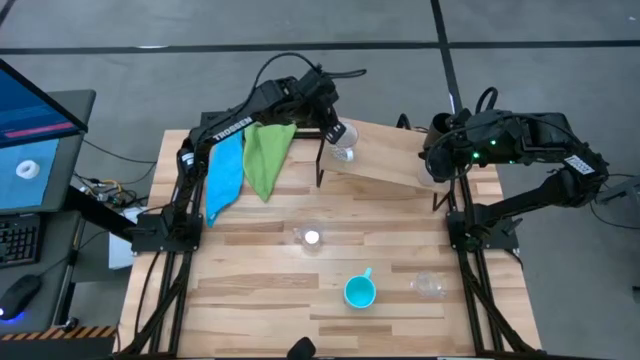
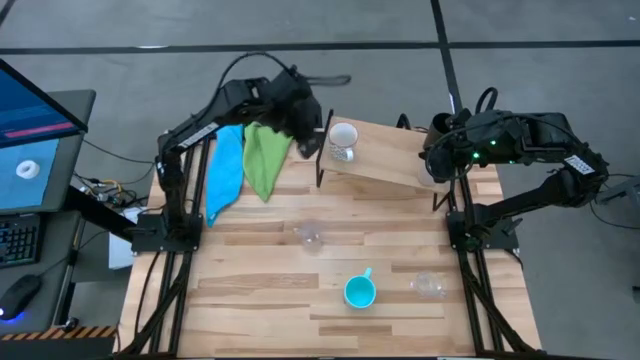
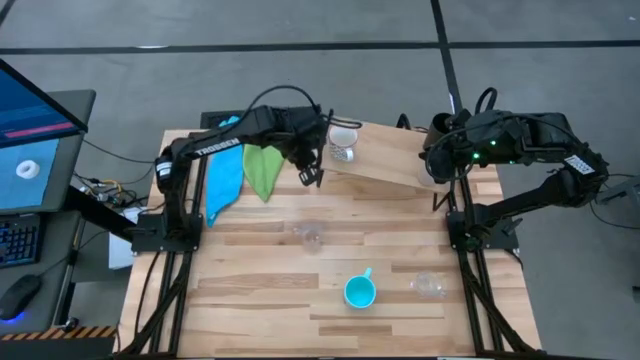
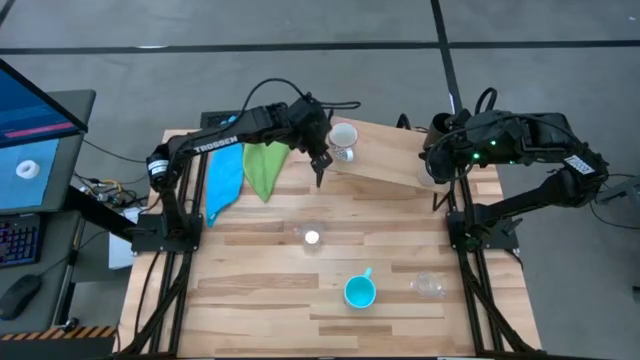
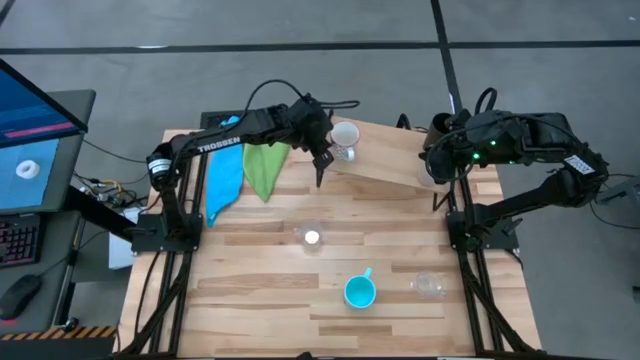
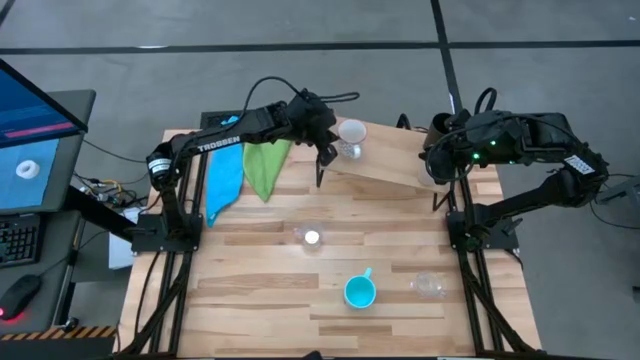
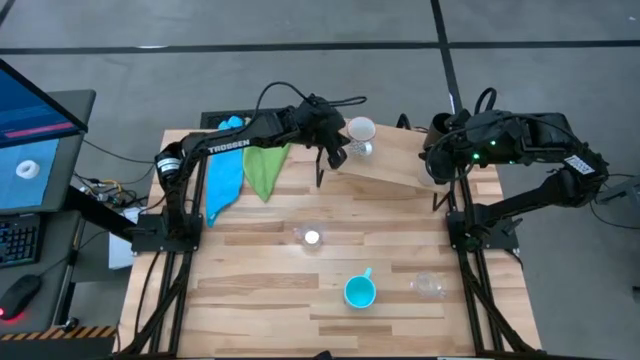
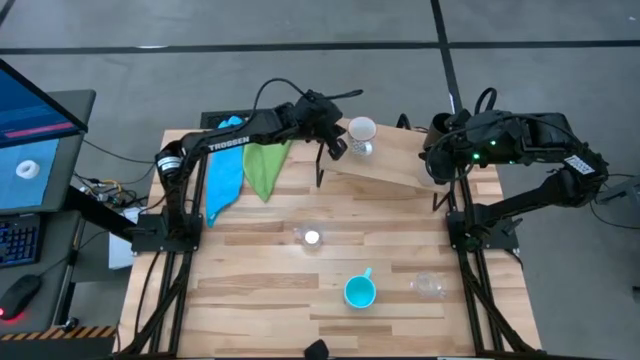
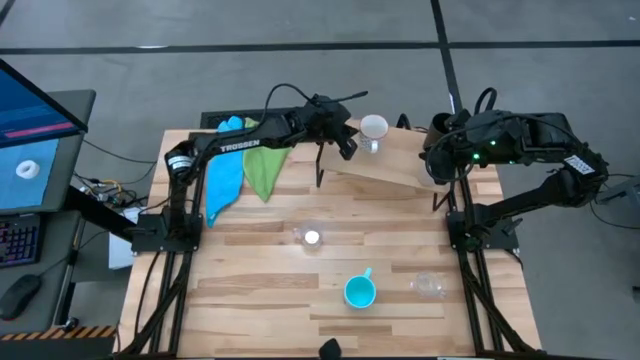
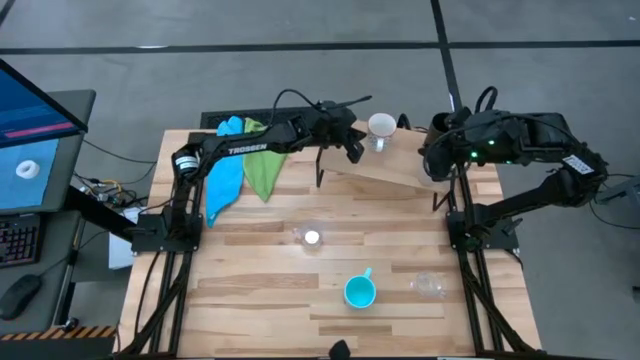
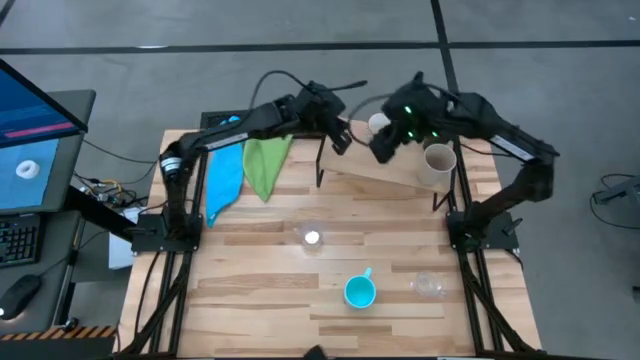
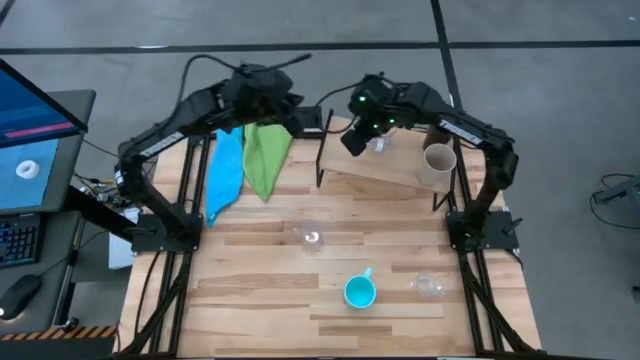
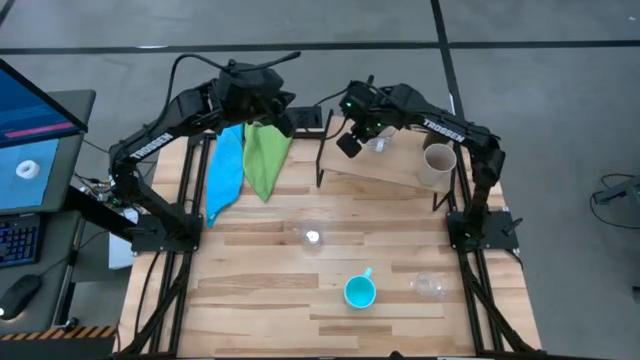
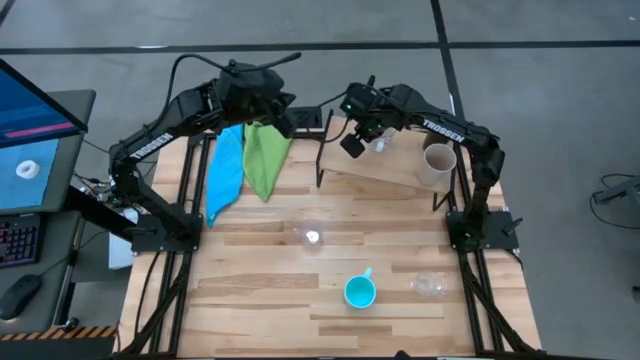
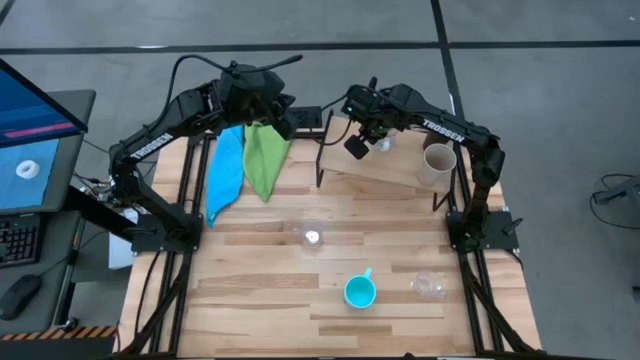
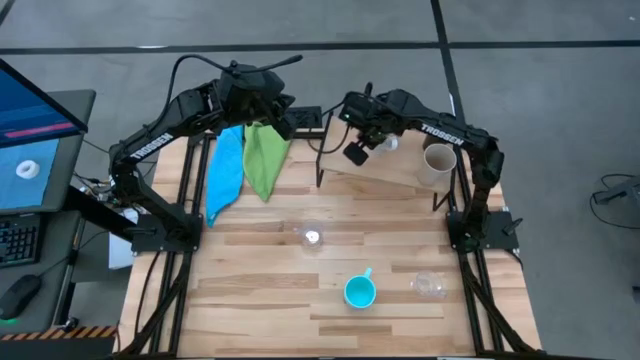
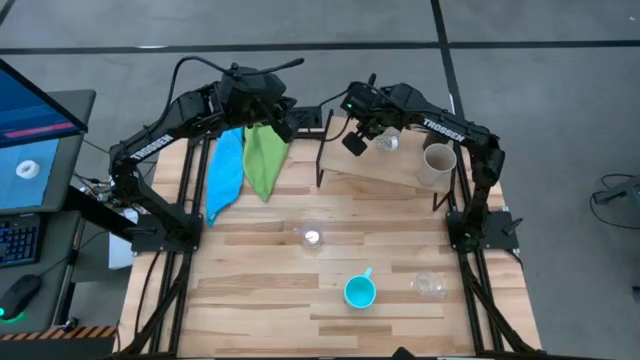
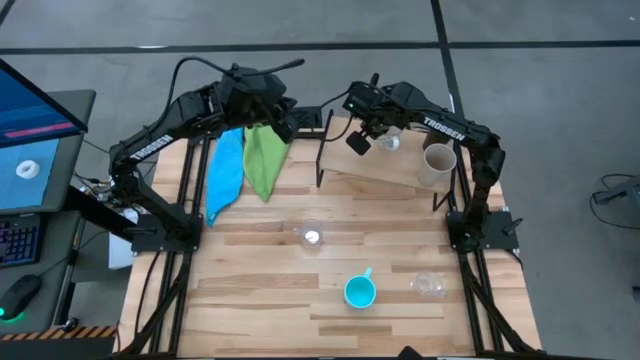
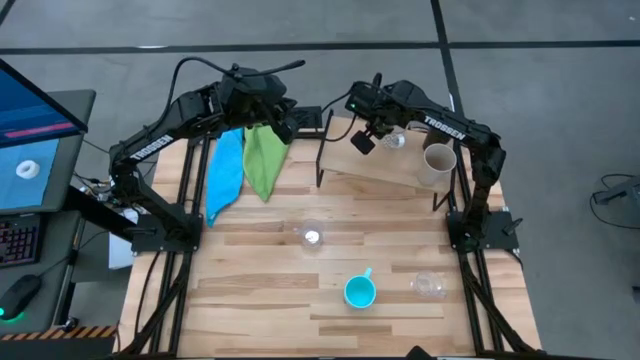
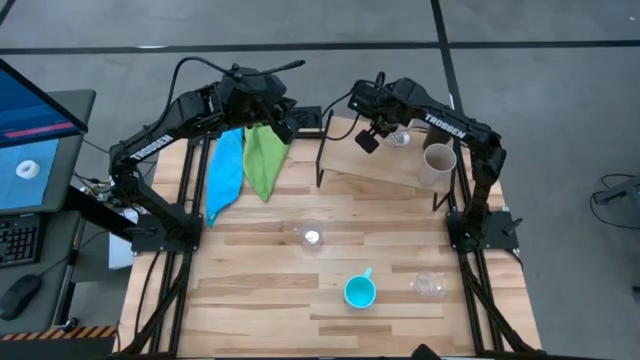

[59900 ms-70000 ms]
Task: Stack small to large cups/mugs on shelf
Move the white patterned mug to the middle top of the shelf
